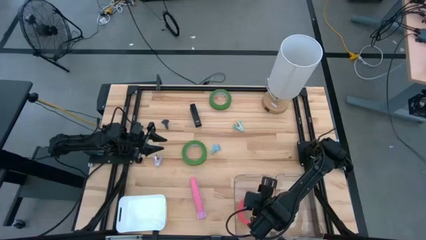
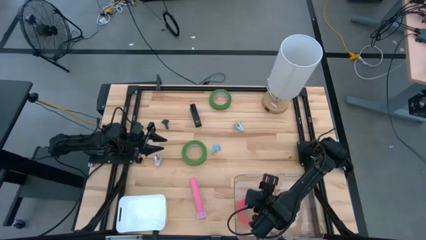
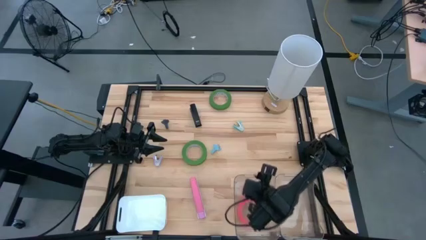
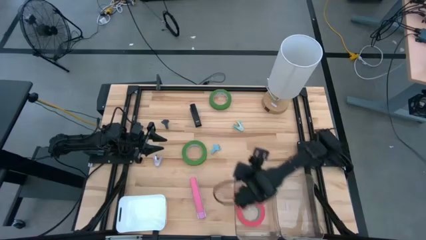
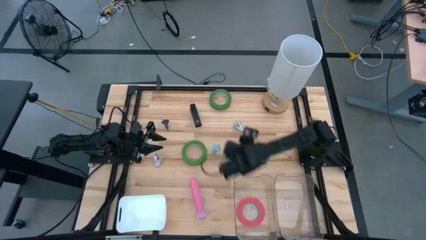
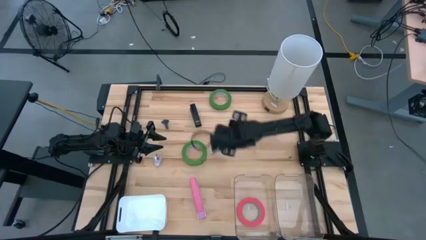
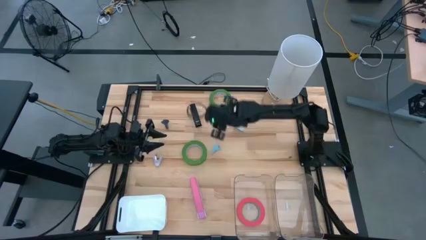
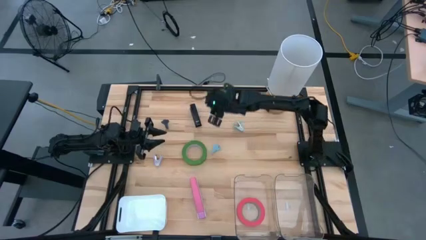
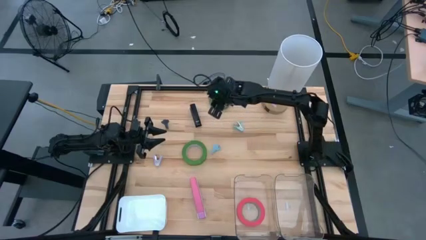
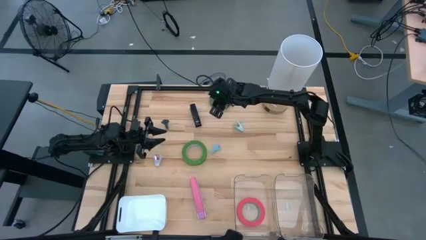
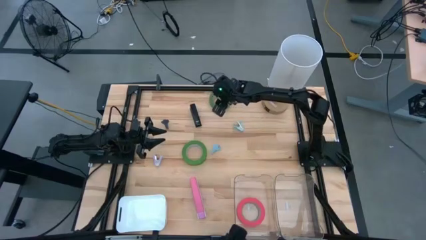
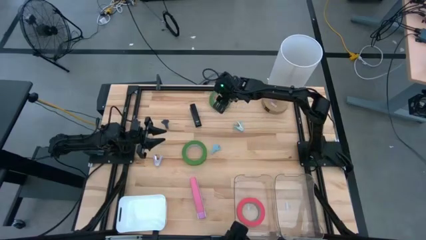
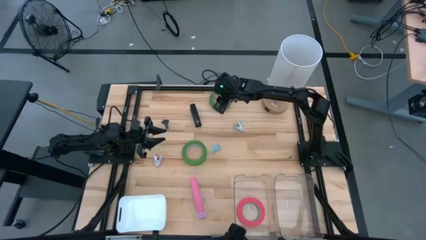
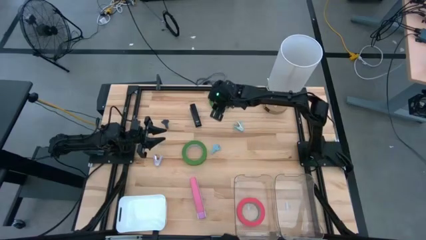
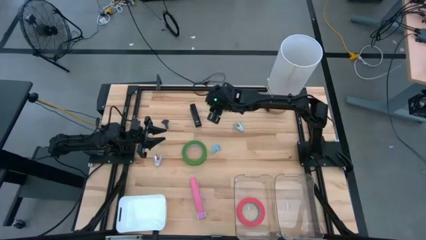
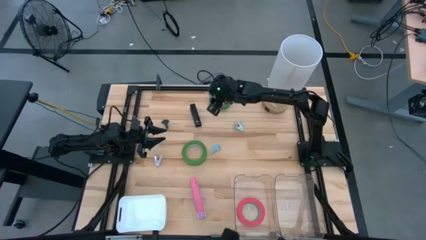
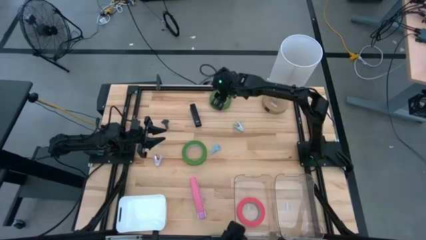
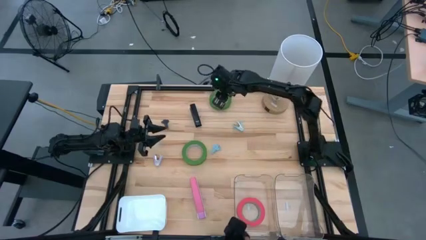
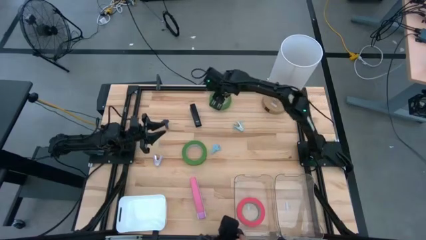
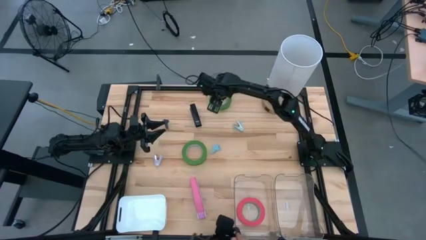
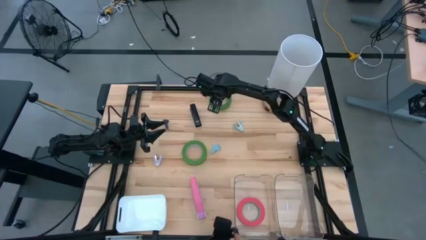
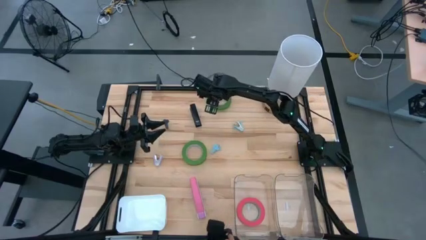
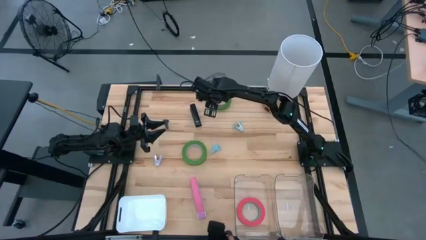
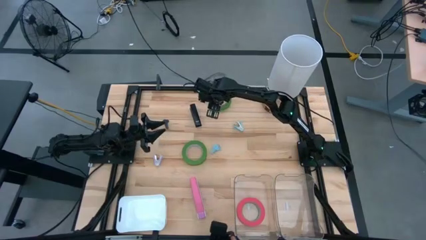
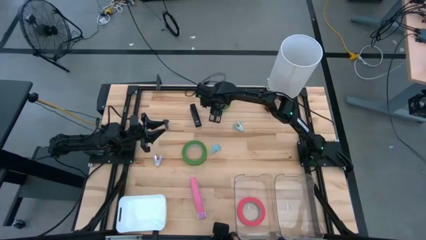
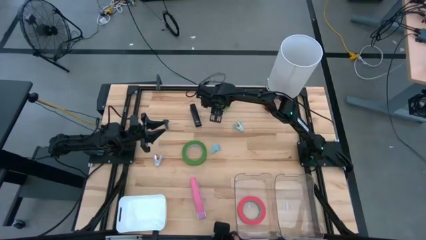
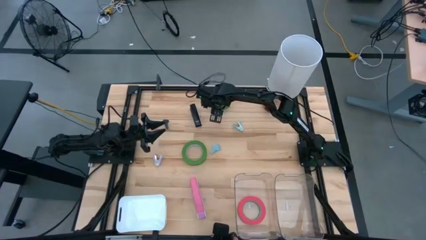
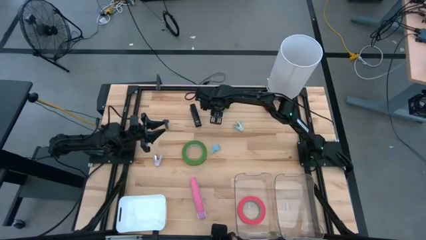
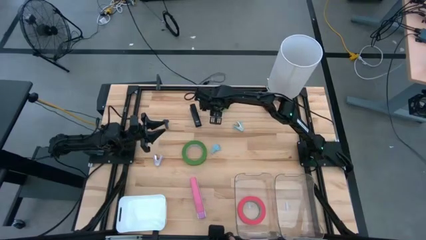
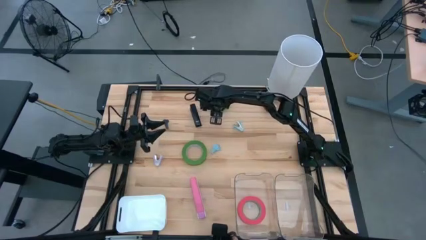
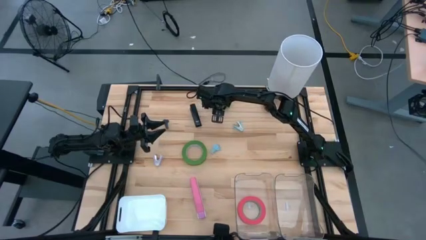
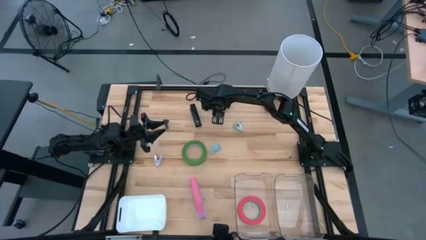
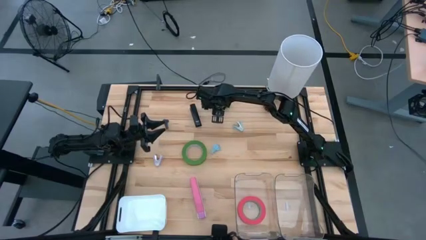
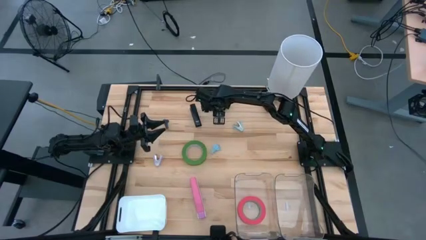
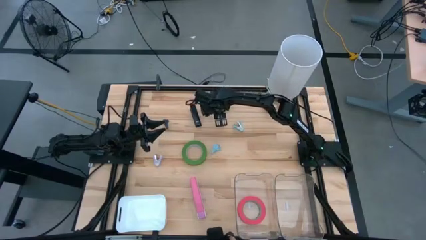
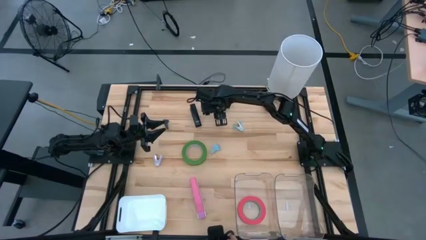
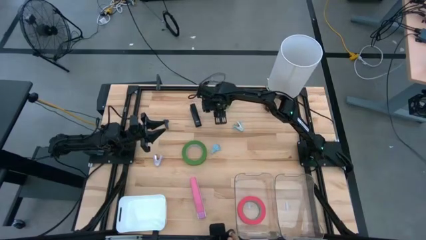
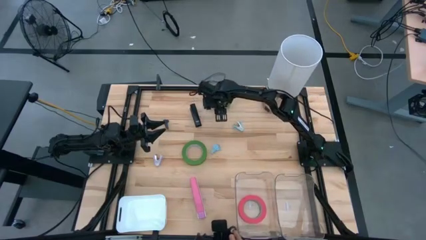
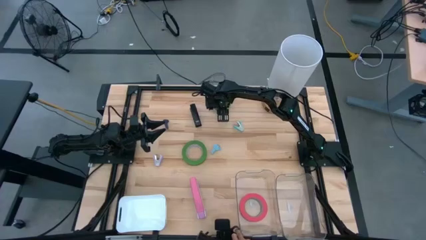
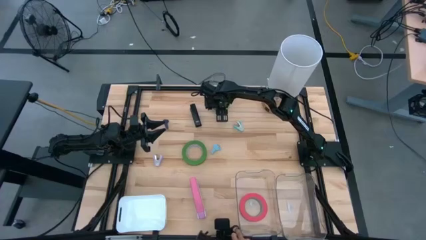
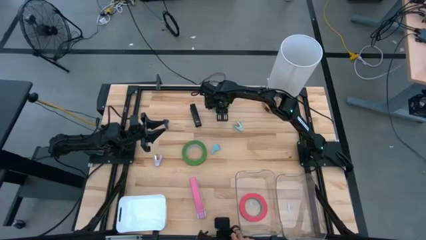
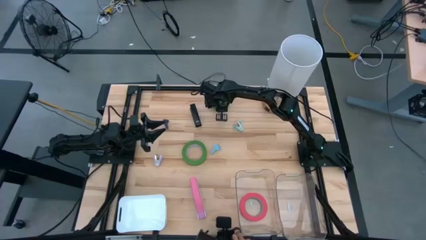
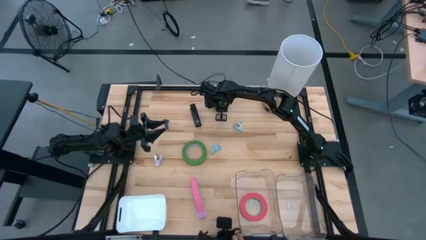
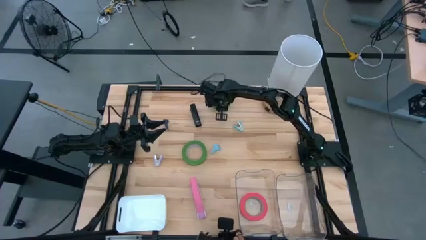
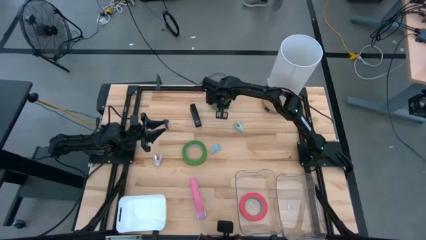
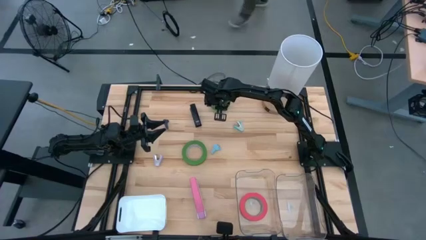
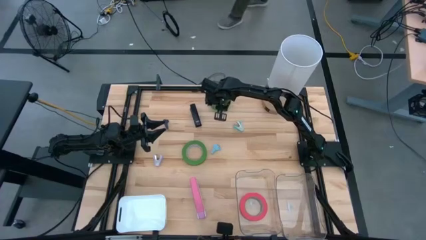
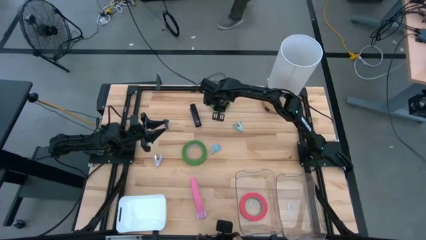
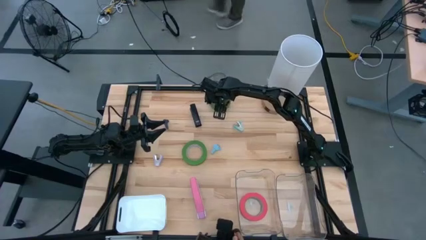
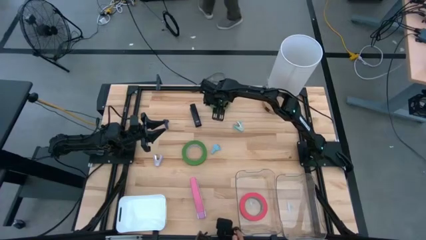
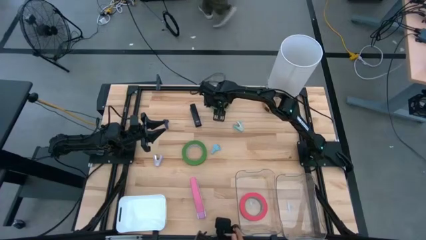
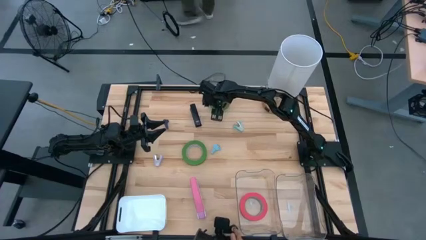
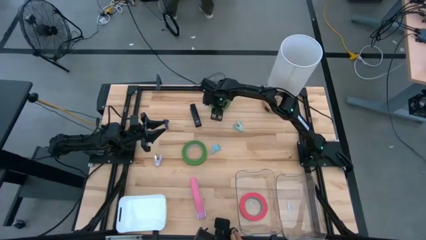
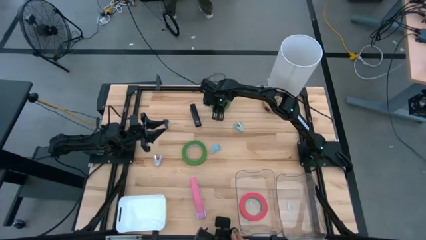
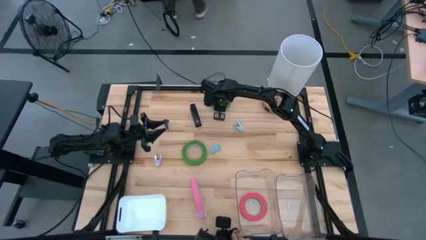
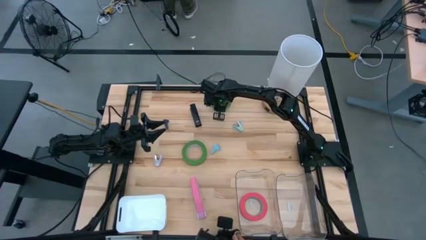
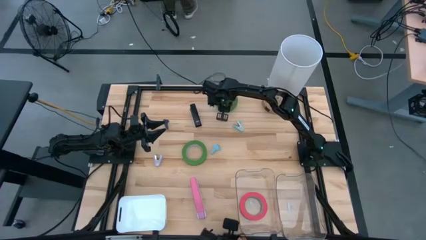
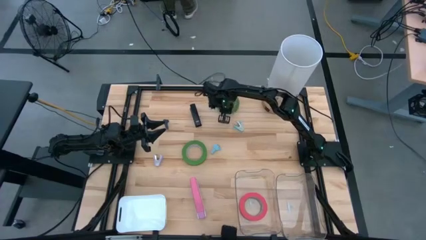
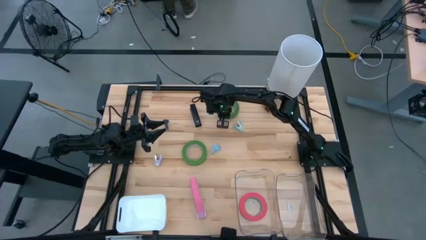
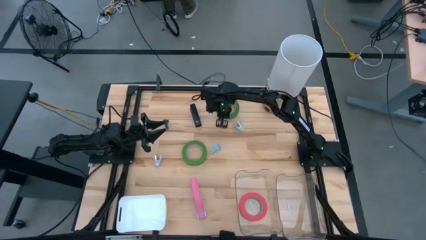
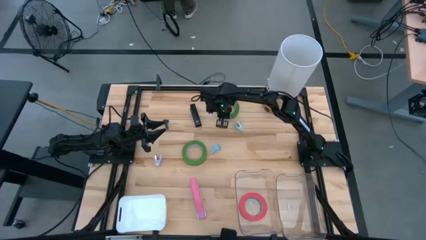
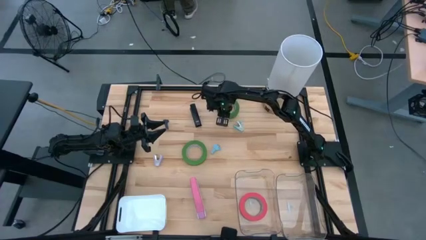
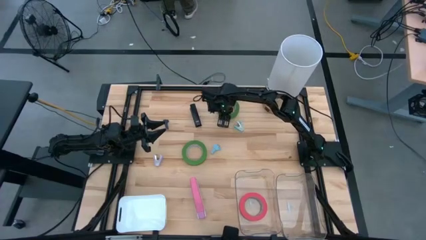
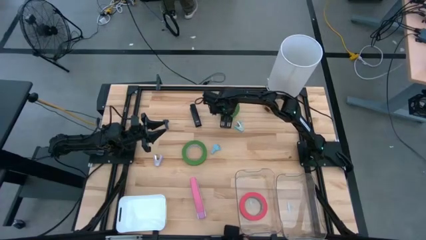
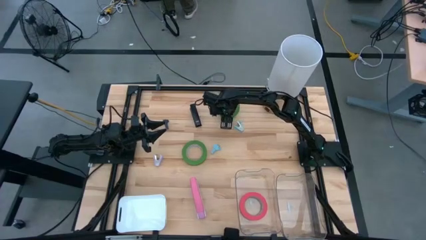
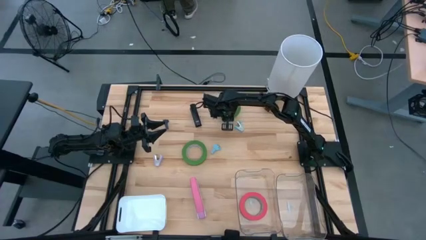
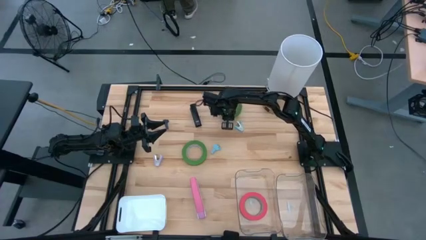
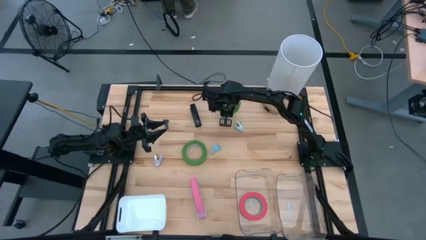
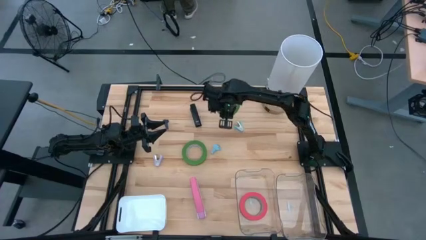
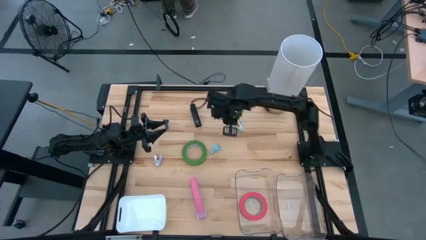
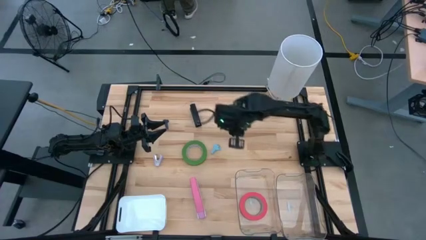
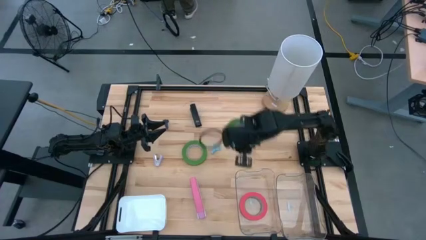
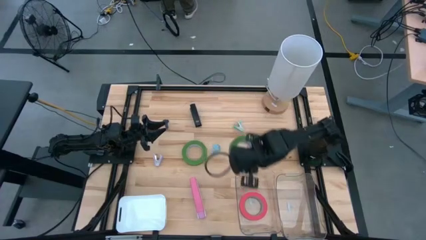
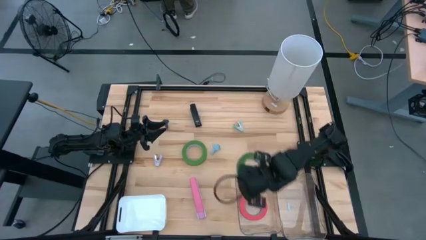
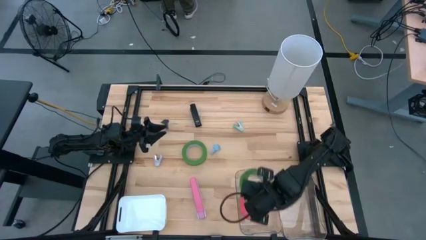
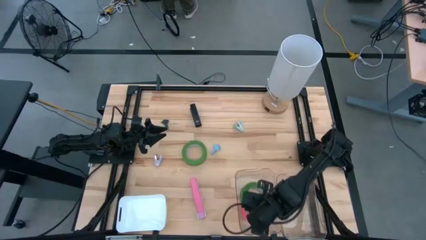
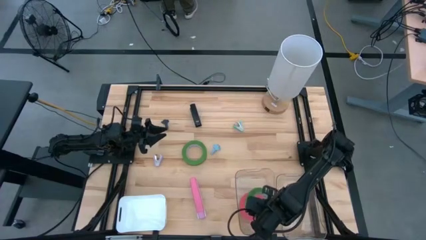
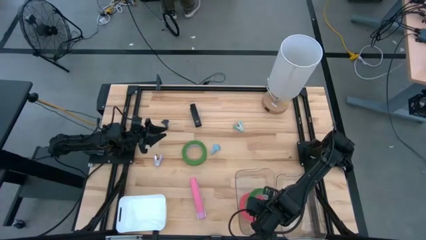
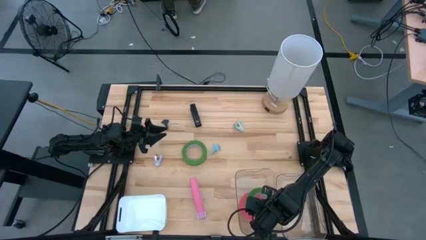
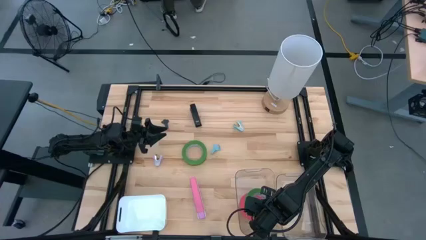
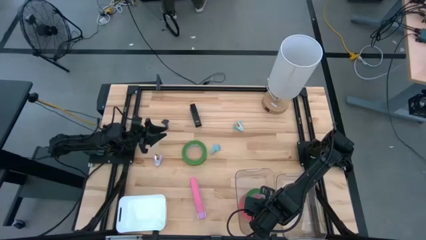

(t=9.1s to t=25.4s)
Task: Pick and place Stapler, Stapler remover, tape
Put the top green tape into the left transparent bin
